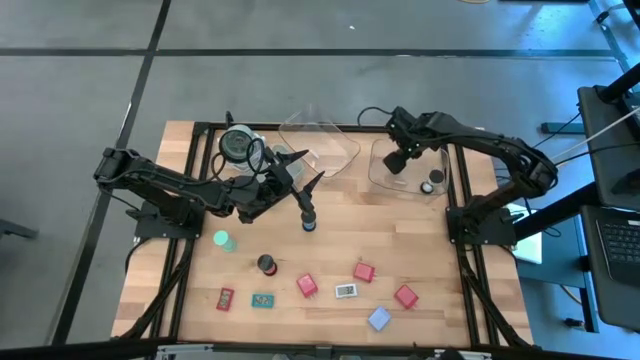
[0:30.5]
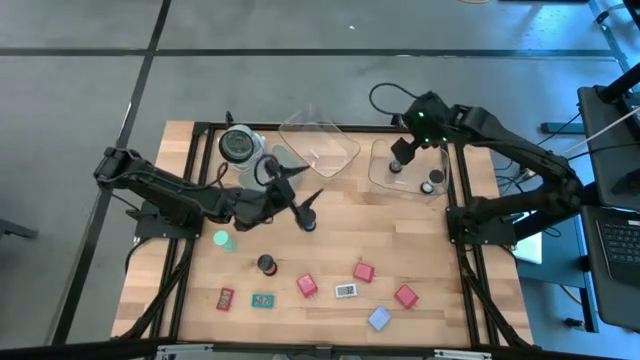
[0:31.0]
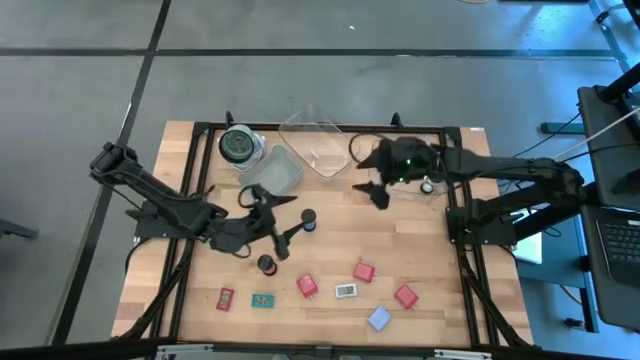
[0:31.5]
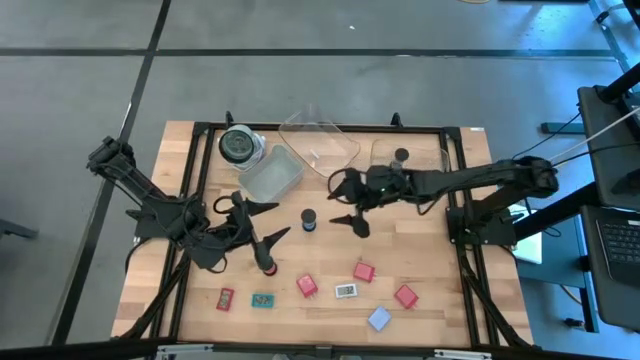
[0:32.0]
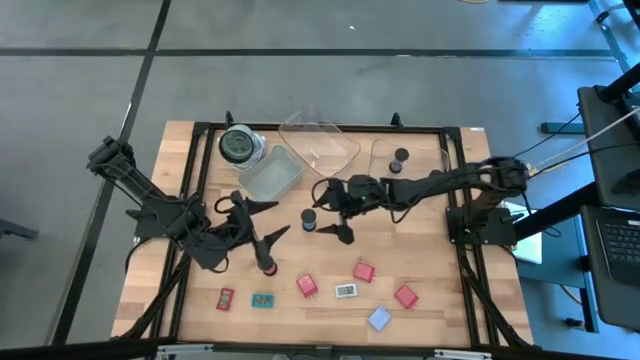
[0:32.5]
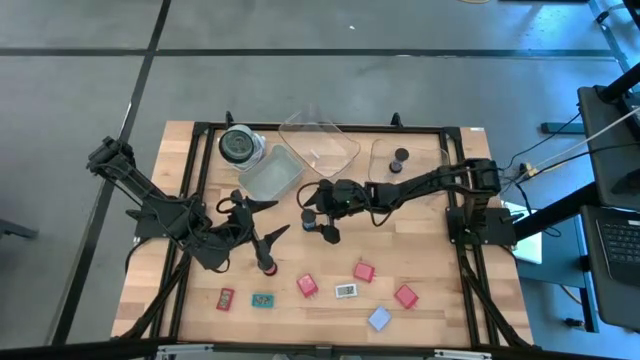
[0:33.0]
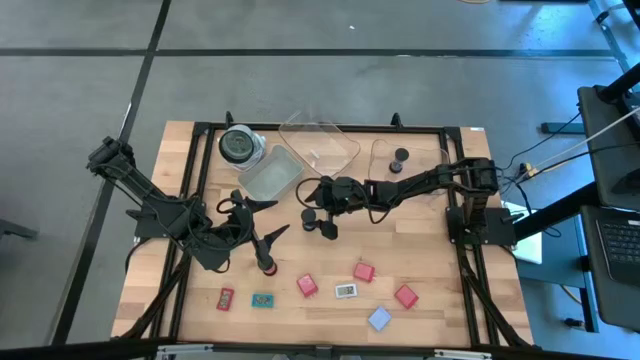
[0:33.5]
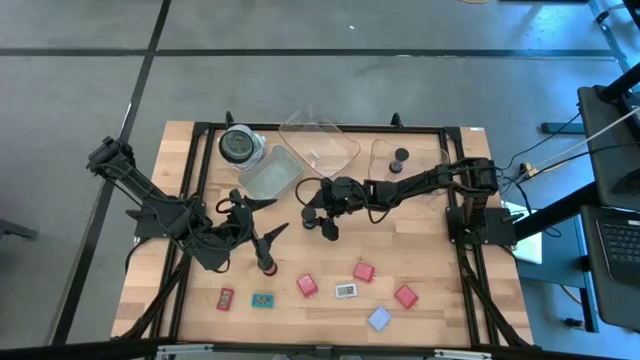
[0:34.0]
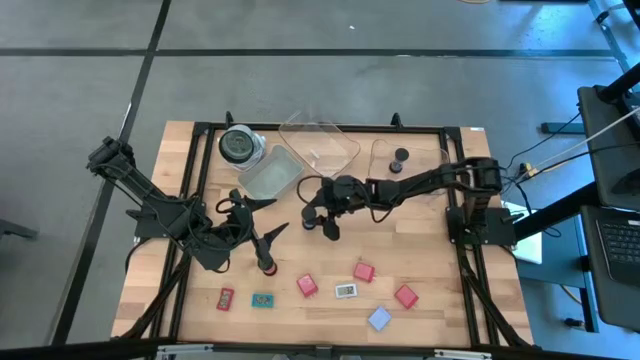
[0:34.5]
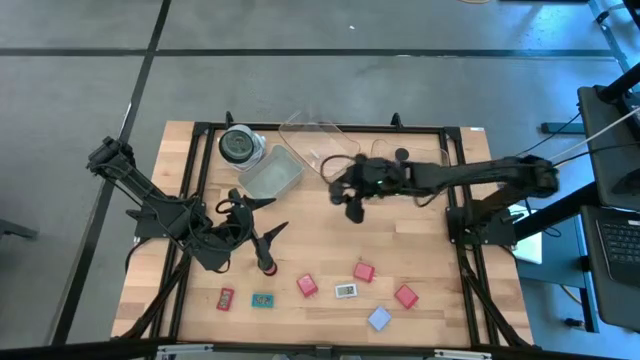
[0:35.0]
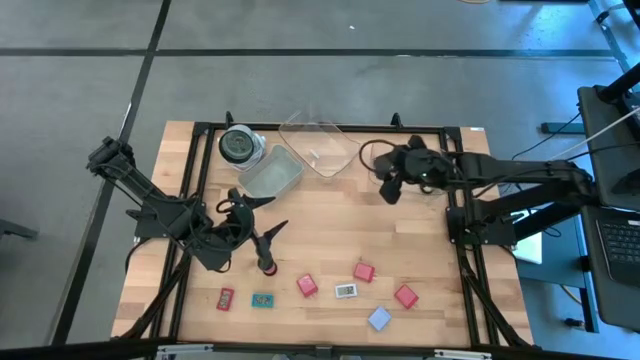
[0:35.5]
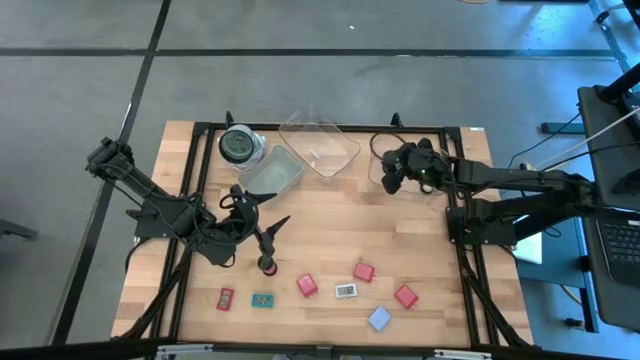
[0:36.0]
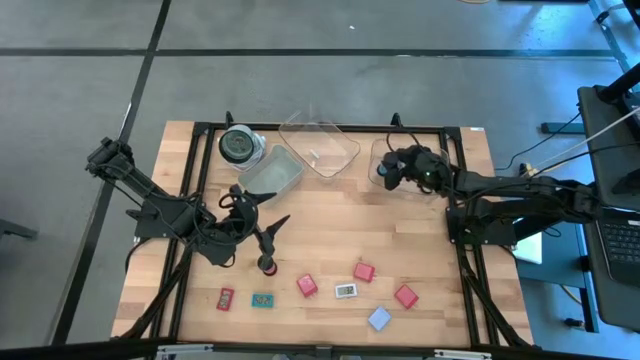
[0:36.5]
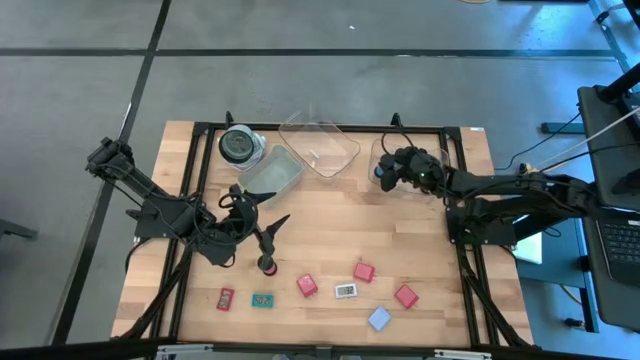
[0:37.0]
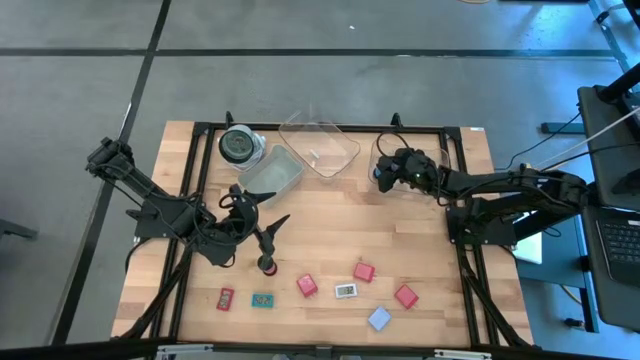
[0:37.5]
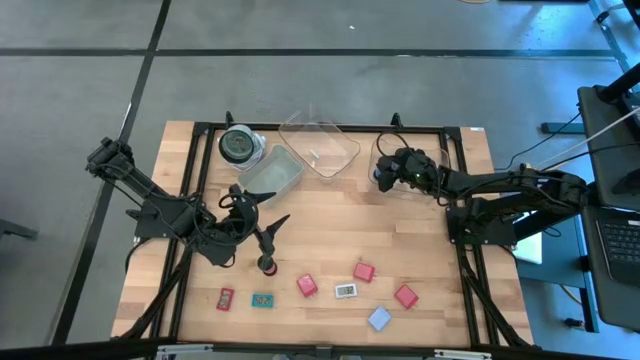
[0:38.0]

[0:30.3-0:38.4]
Task: Pick & Place Office items
Put the blue hourglass into the right transparent bin

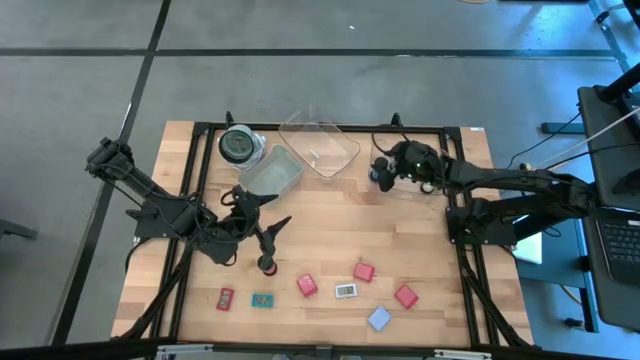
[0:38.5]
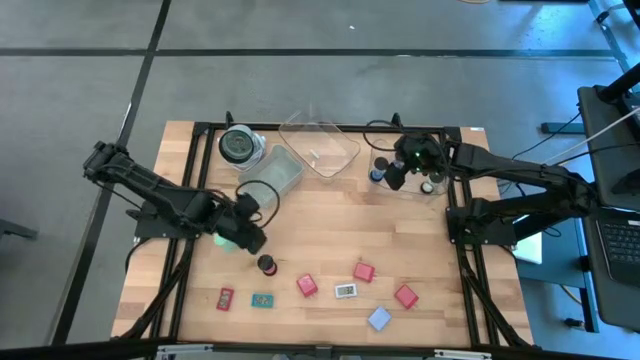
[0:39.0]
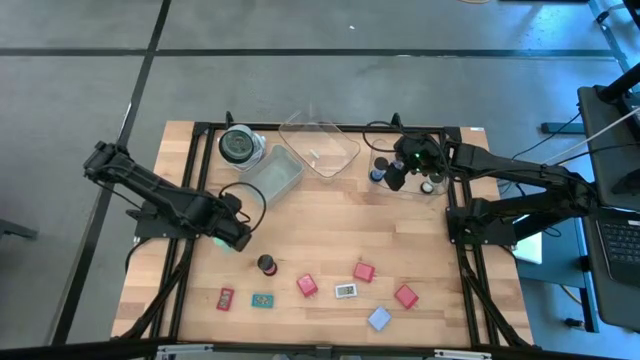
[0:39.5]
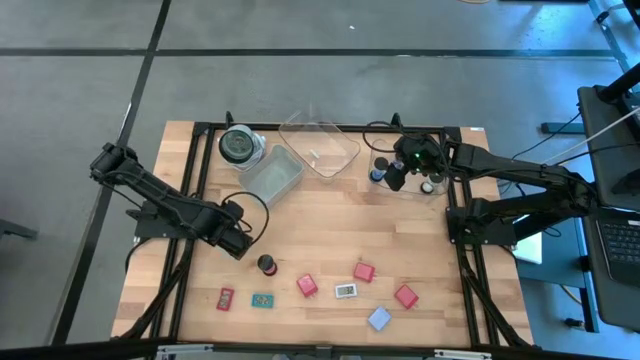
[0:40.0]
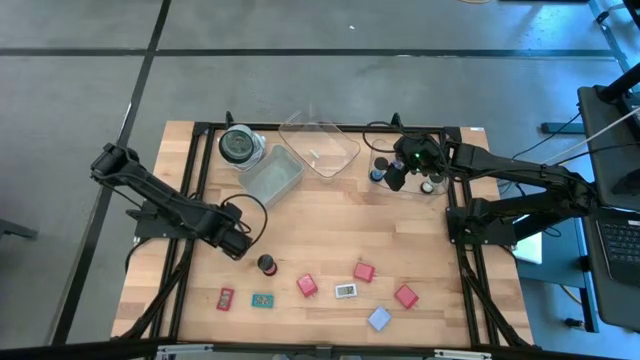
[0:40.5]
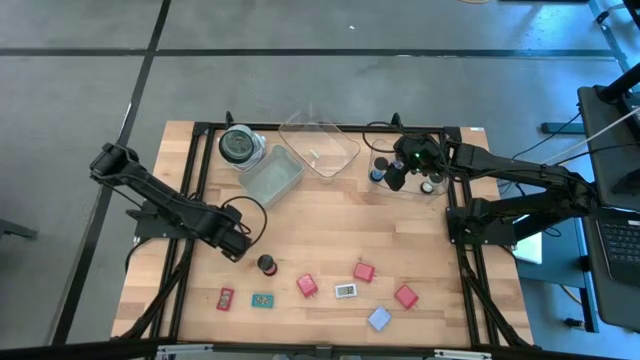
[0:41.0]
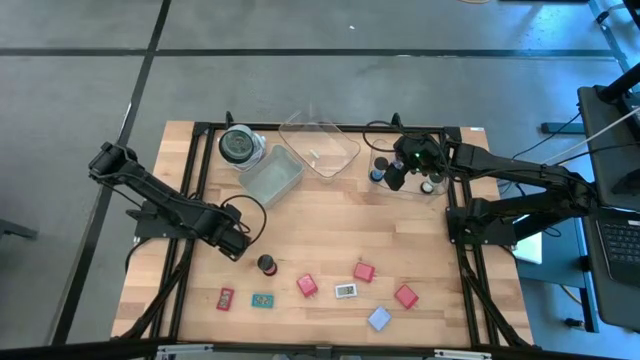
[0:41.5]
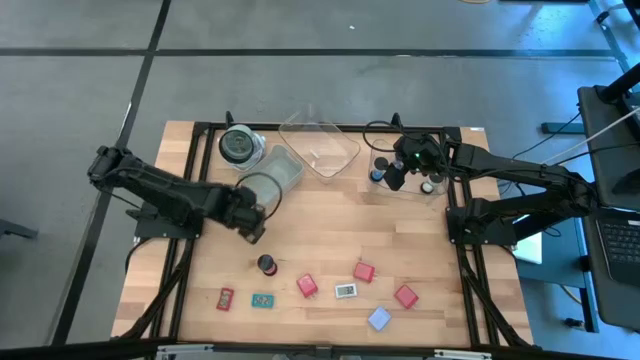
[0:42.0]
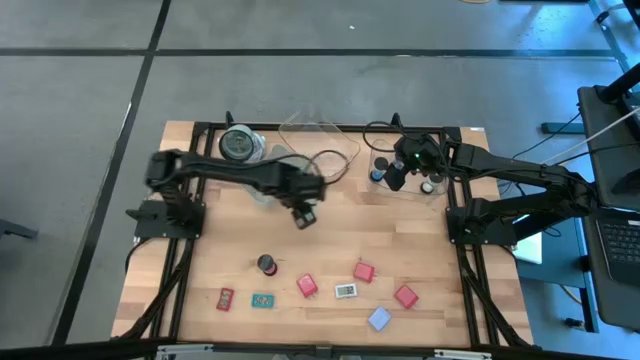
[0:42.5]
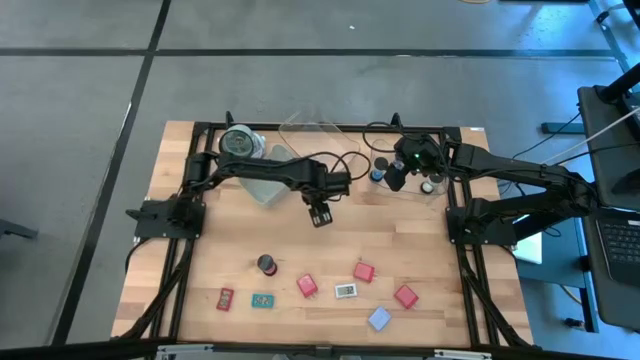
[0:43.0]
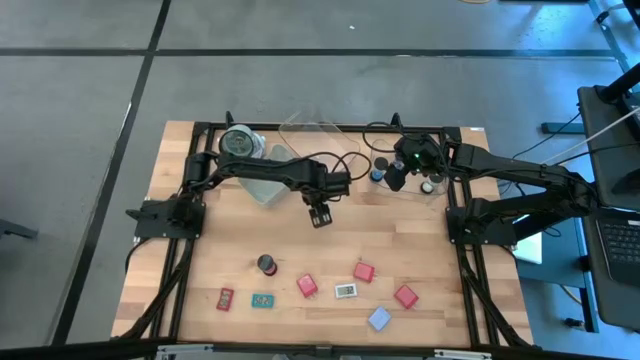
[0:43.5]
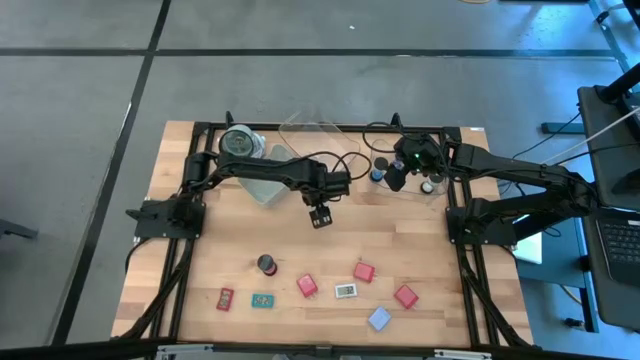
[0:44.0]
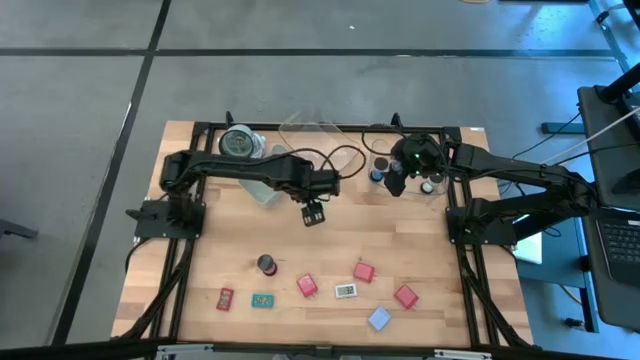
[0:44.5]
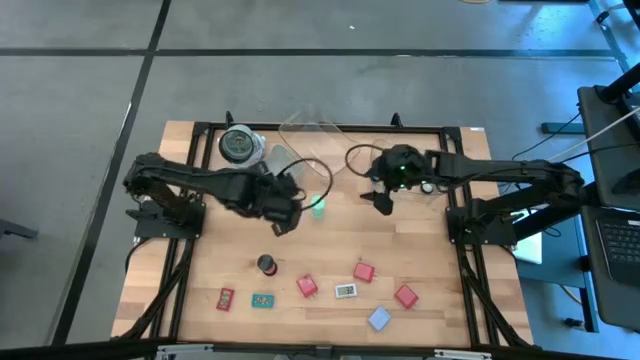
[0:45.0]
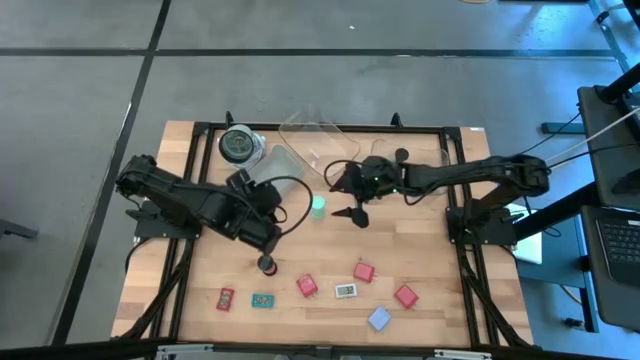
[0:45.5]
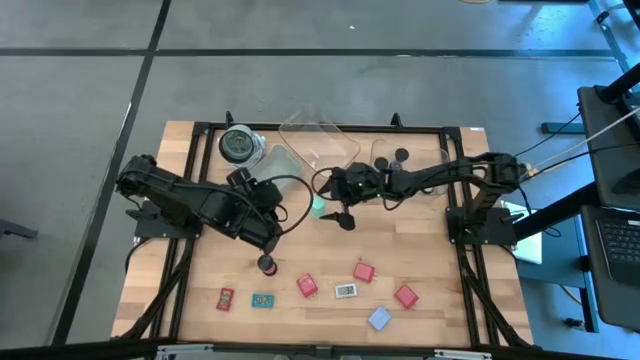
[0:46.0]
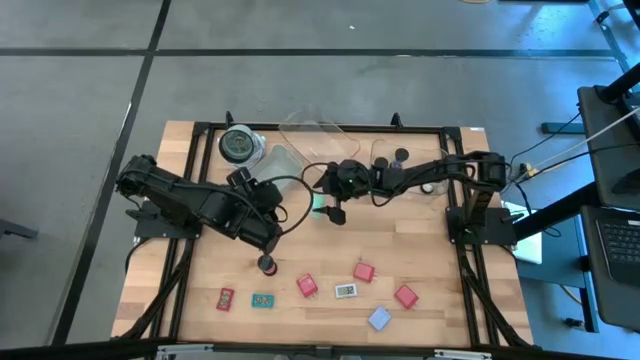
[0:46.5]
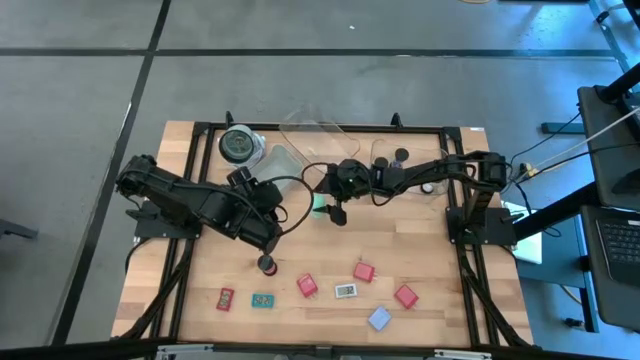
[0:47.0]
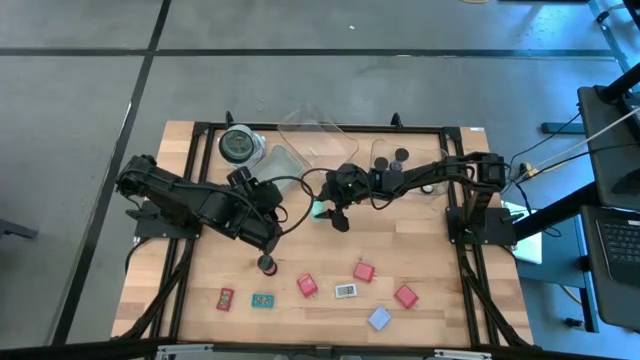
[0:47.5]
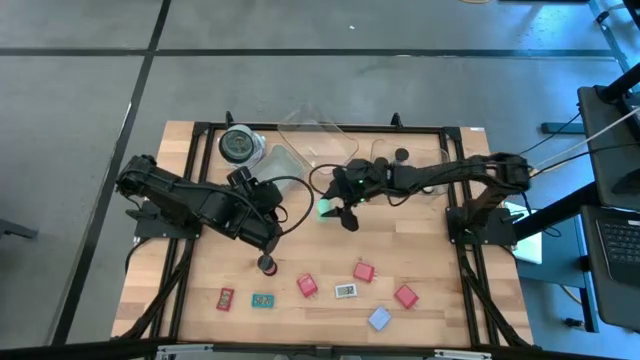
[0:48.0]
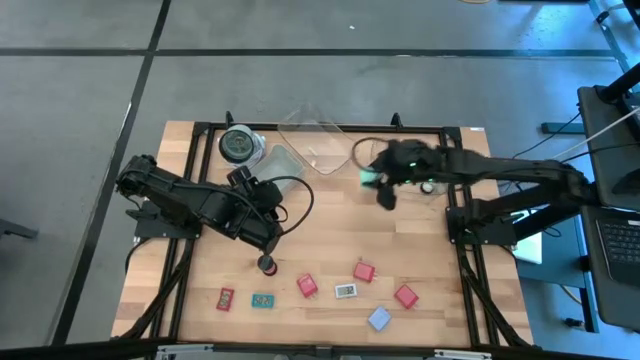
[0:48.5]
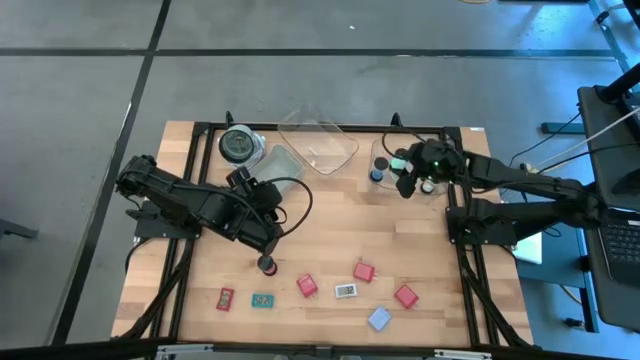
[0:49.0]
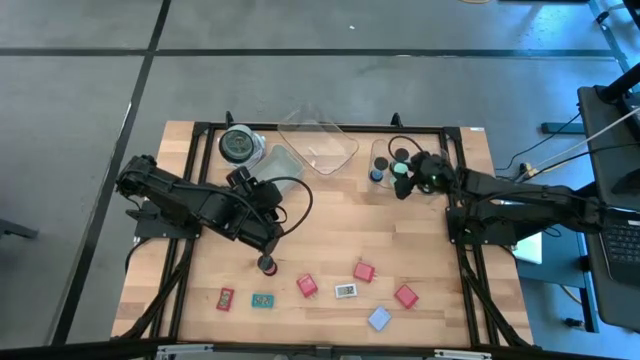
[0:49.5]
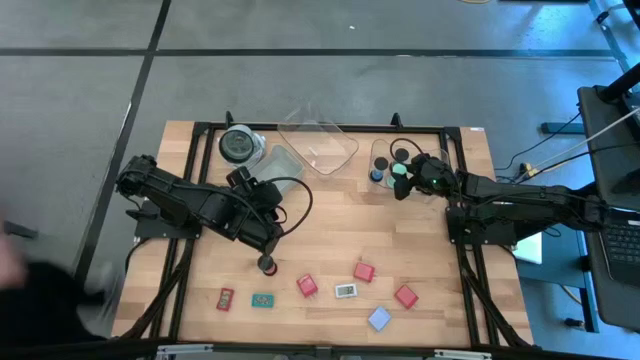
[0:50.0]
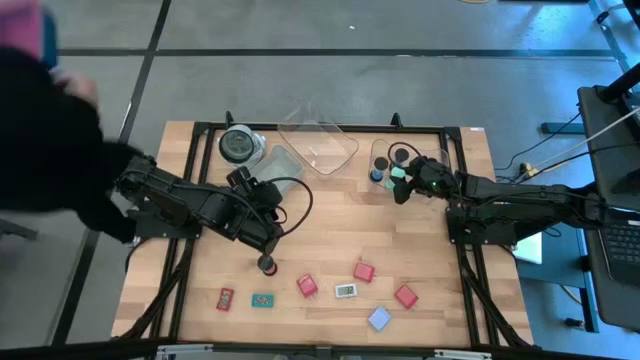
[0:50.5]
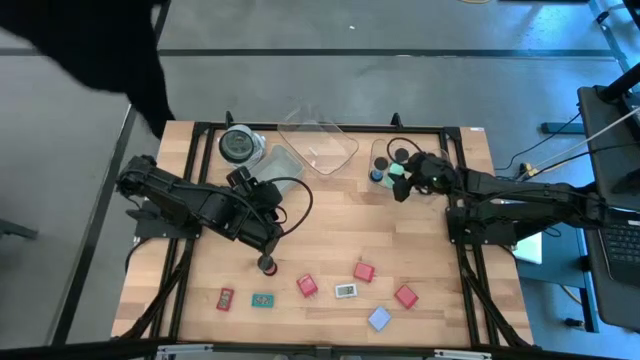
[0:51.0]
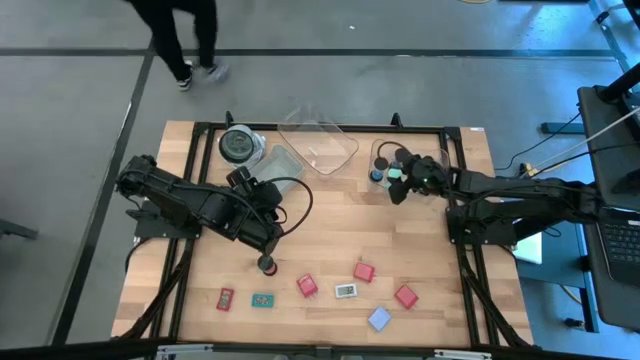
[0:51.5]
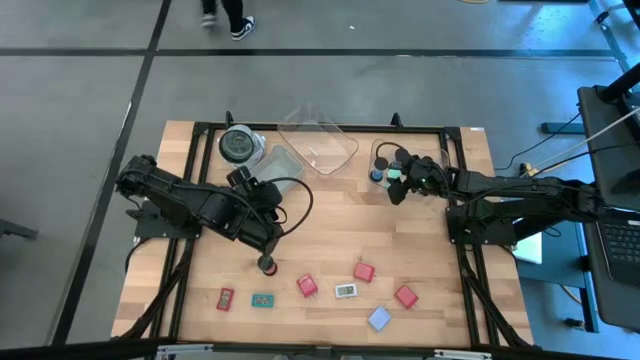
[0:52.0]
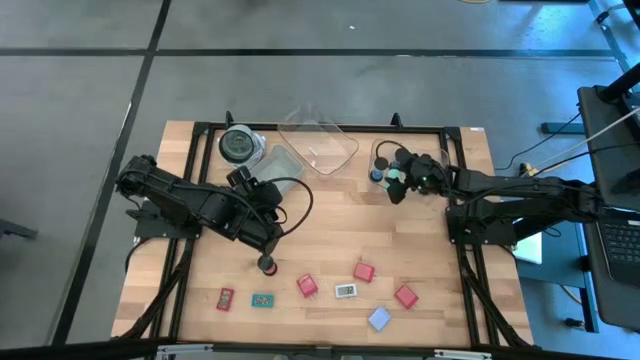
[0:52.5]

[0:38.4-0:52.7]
Put the light blue hourglass into the right transparent bin
